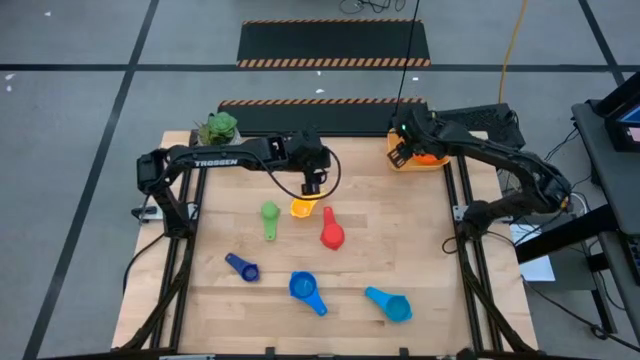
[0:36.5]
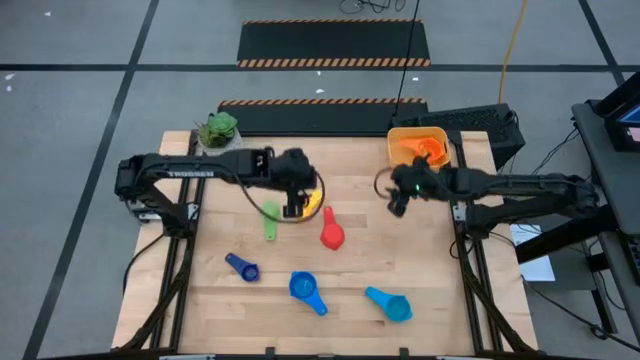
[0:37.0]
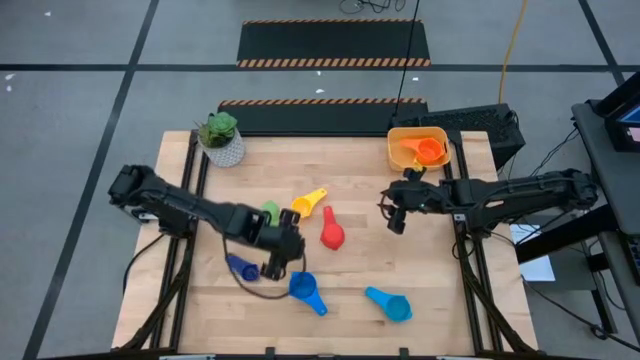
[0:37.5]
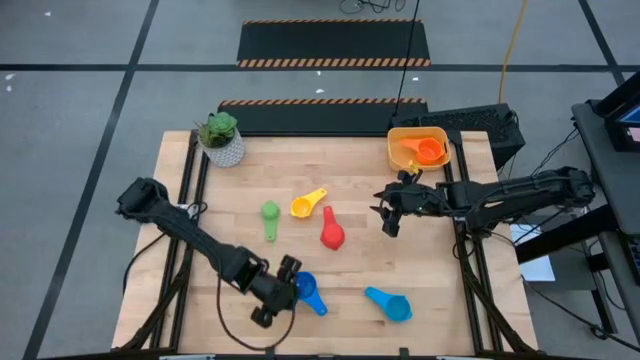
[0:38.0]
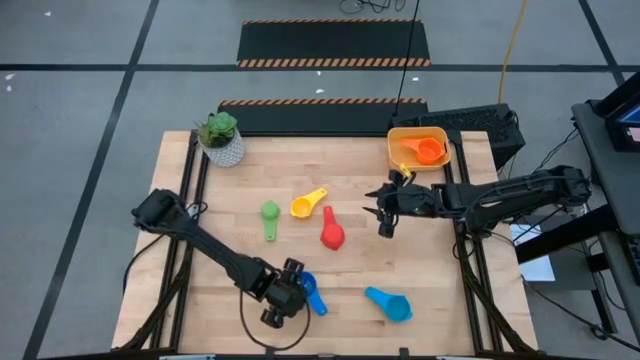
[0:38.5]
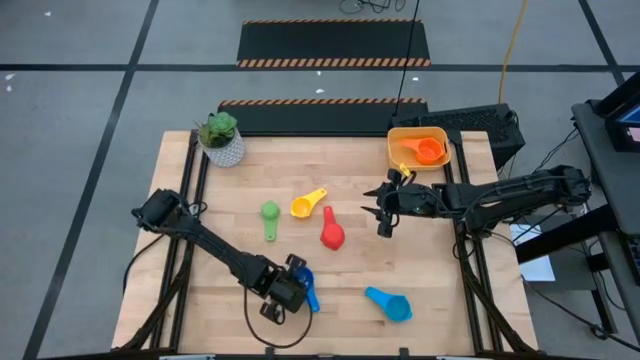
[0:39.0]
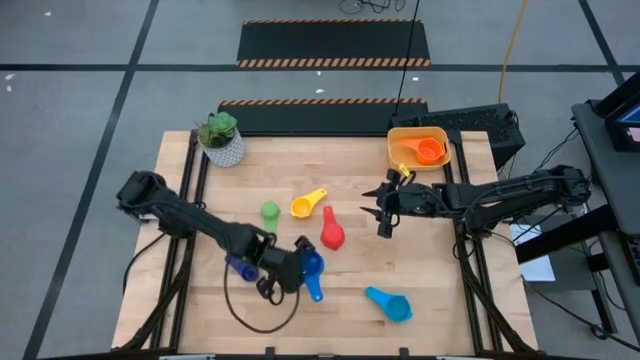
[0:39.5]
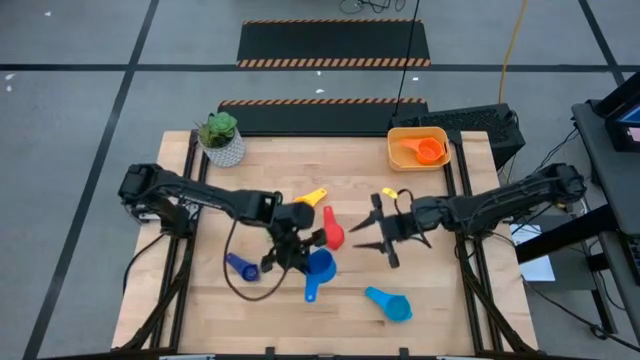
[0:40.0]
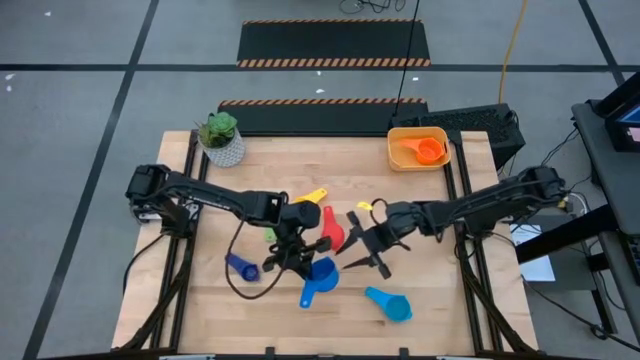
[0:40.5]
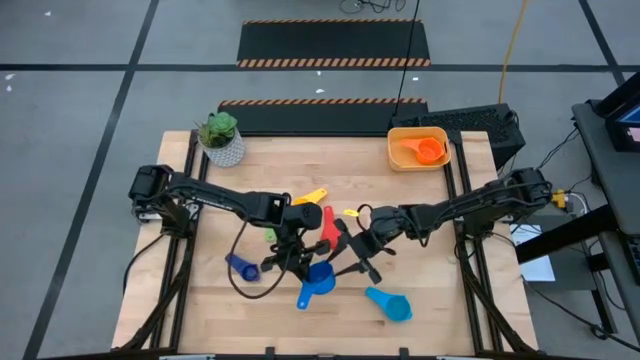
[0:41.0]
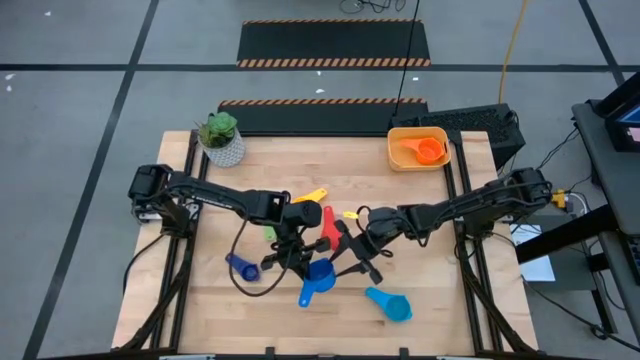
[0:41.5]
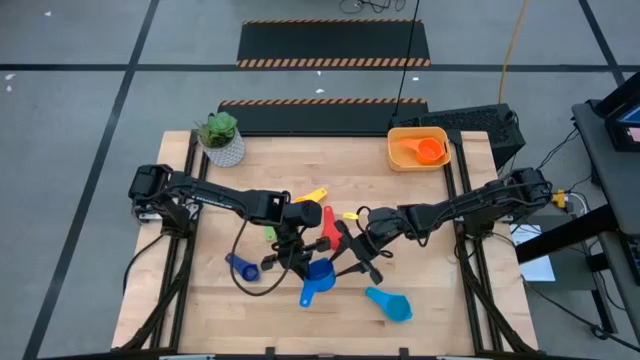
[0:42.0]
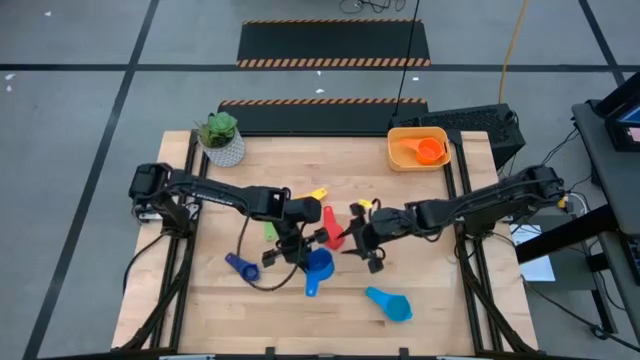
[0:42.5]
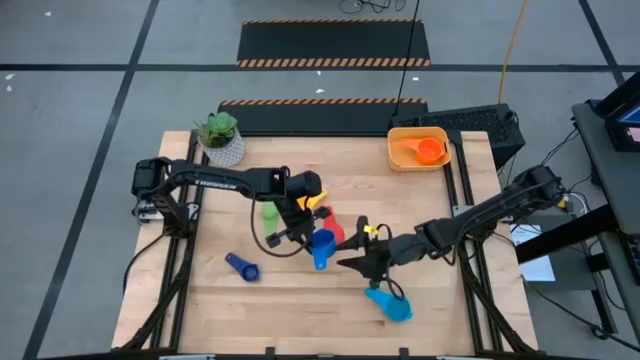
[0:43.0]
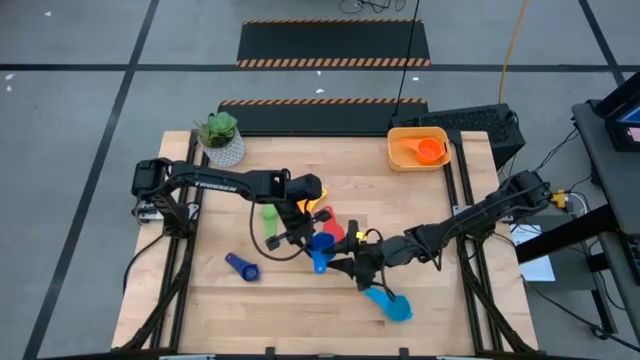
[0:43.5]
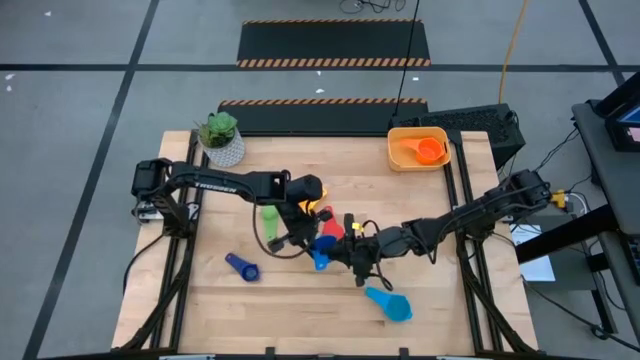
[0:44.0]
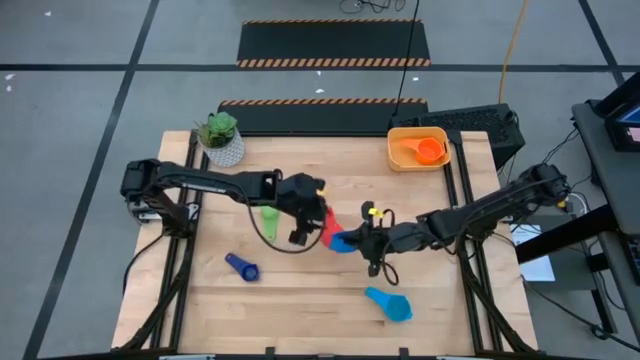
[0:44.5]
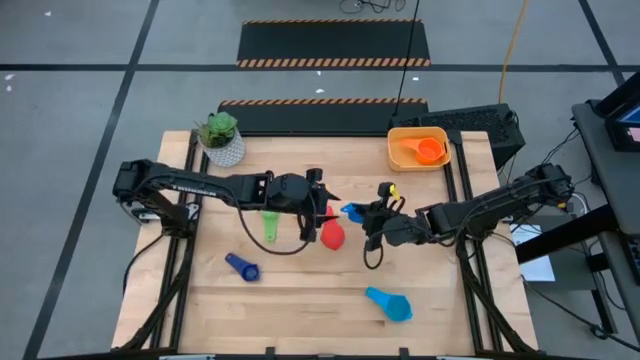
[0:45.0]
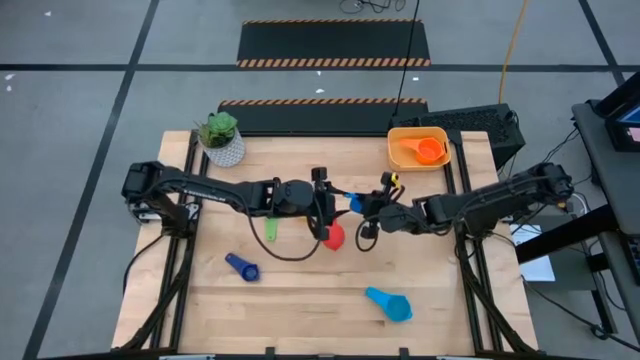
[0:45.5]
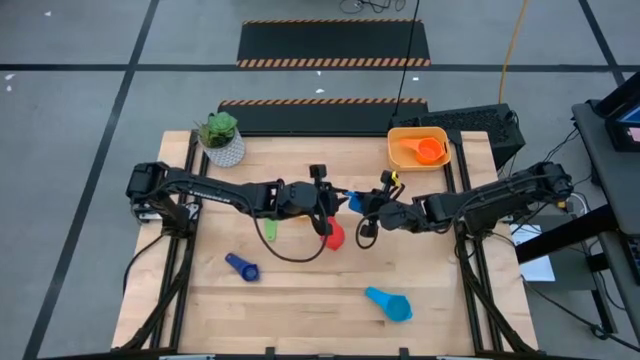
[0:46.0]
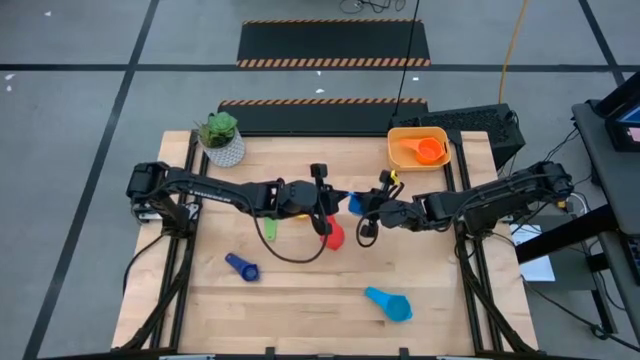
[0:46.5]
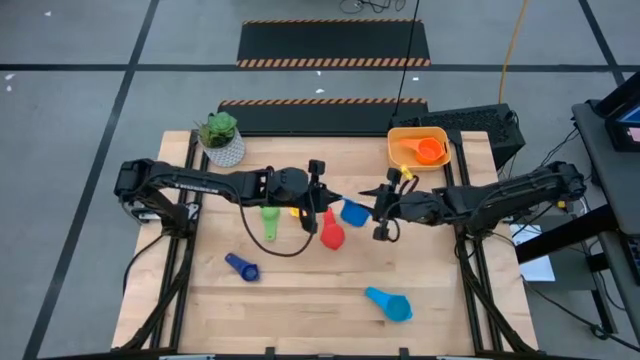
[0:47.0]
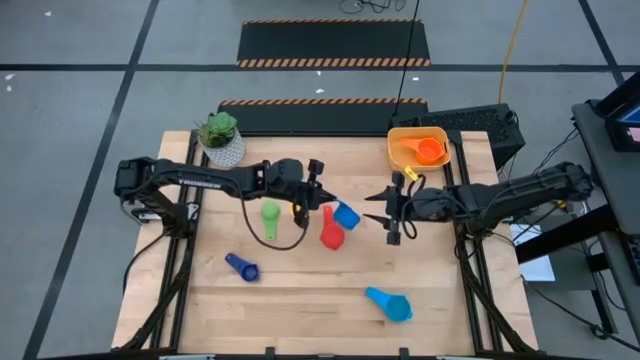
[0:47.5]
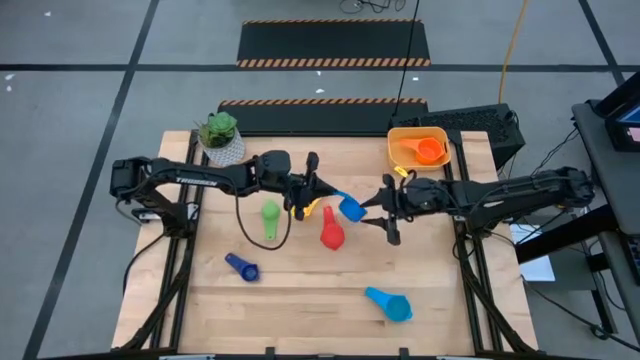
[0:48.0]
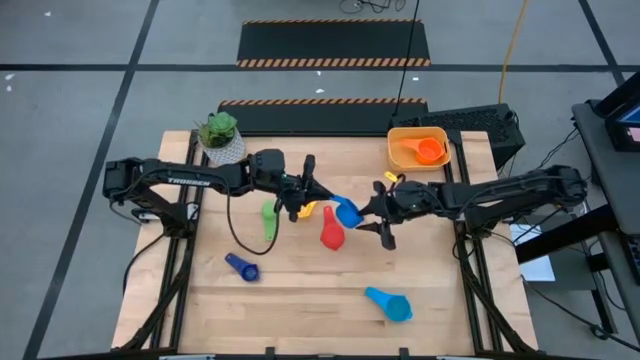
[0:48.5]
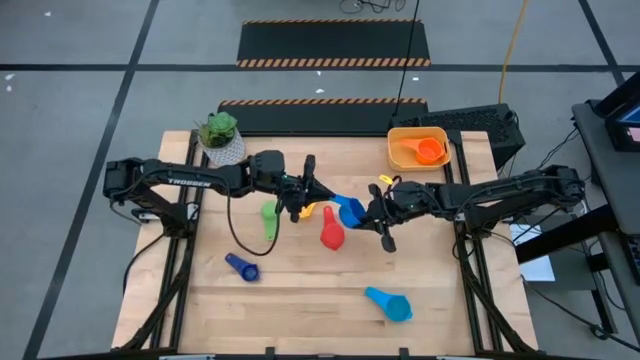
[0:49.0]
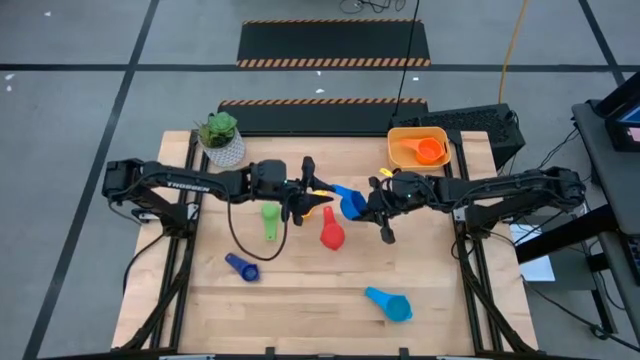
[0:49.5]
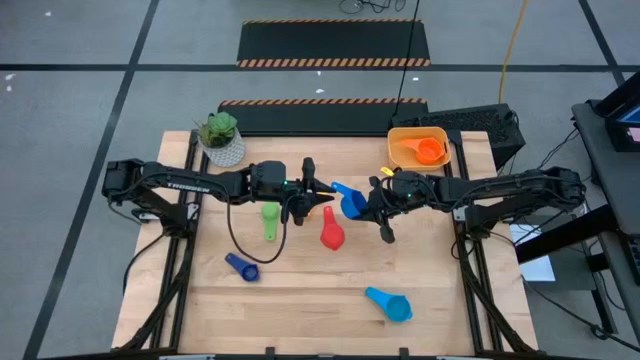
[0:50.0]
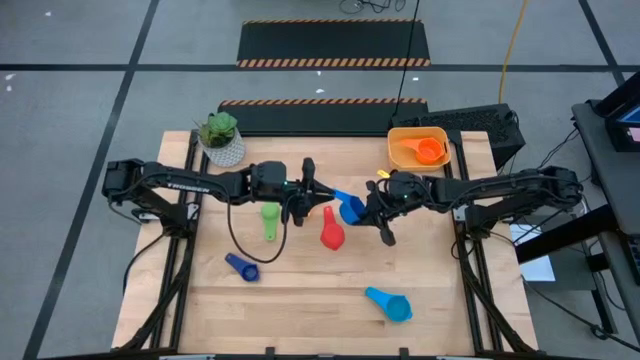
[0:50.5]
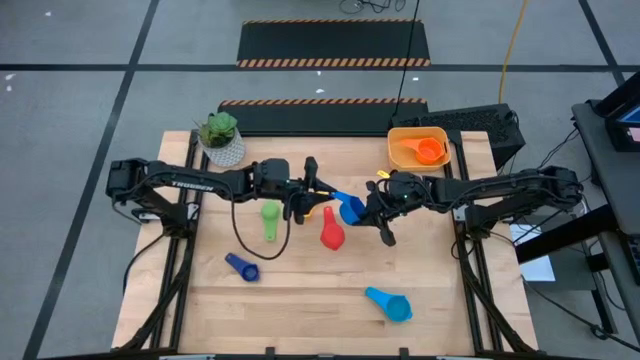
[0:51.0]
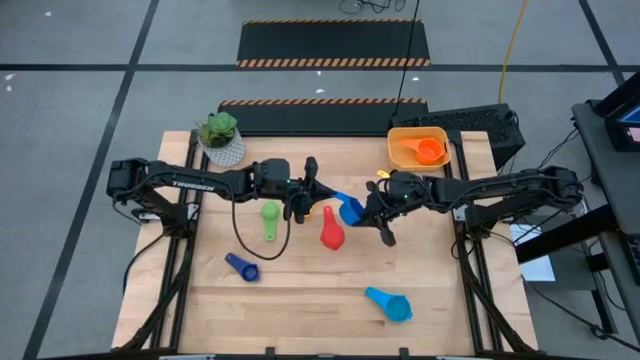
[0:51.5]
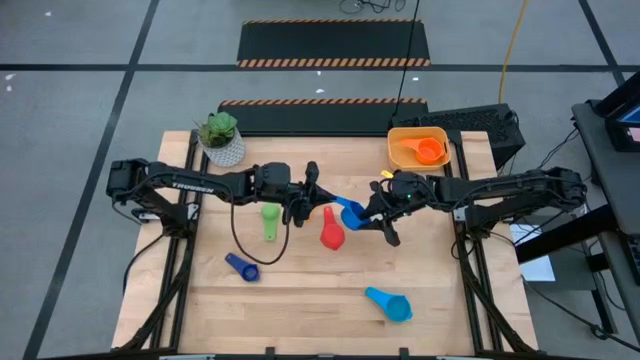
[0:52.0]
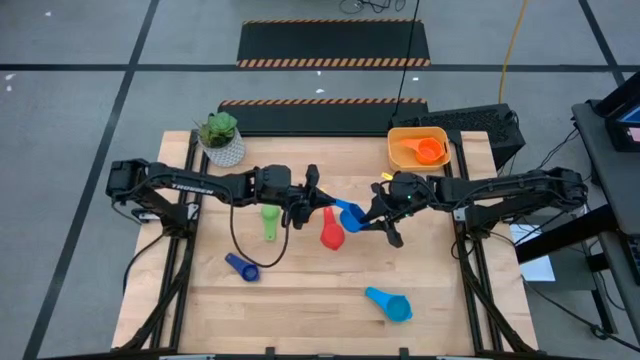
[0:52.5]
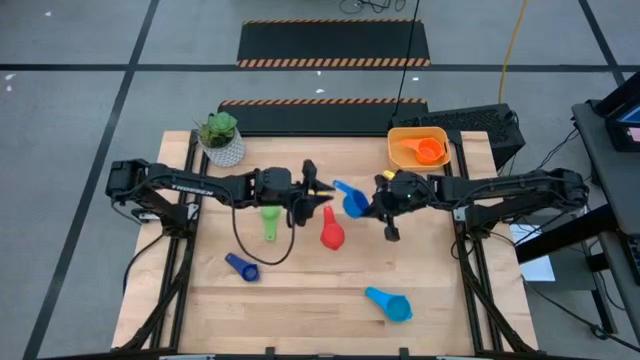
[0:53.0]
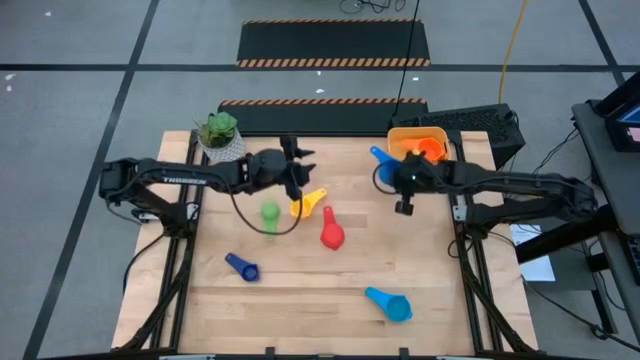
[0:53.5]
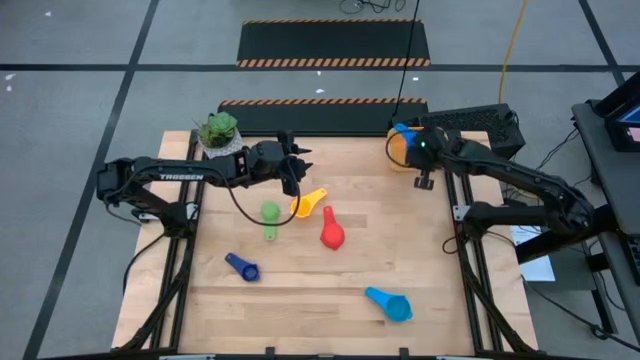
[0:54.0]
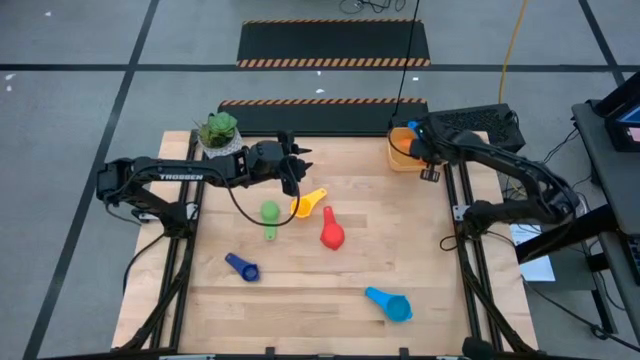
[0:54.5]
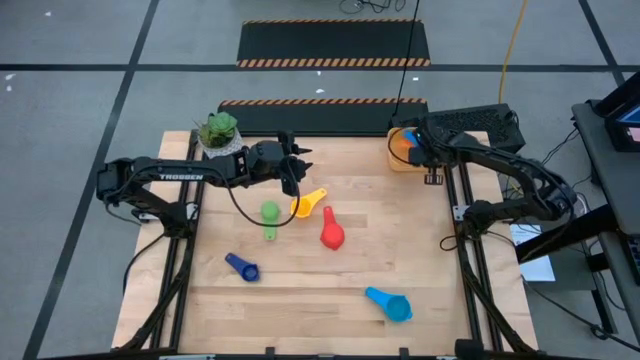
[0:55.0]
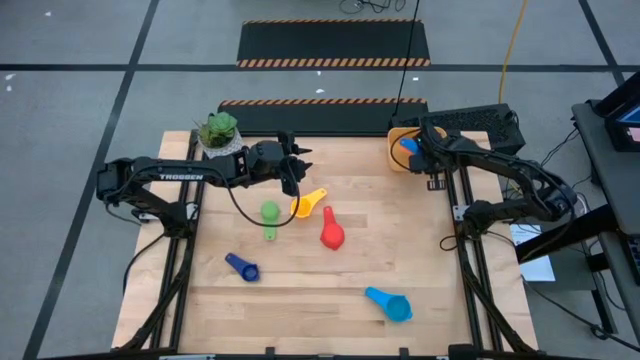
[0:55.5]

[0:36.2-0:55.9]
Task: Nest measuring cups in basket
Stack the left light blue measuring cup on top of the orange measuring cup into the bin

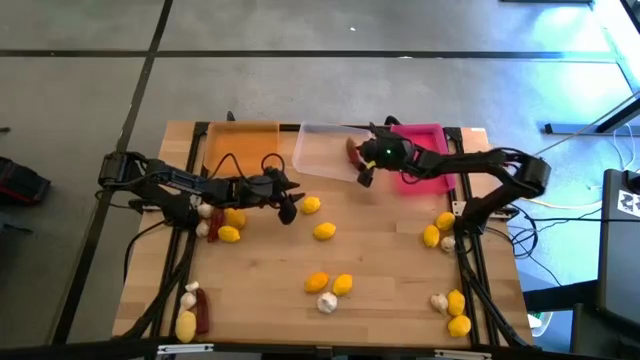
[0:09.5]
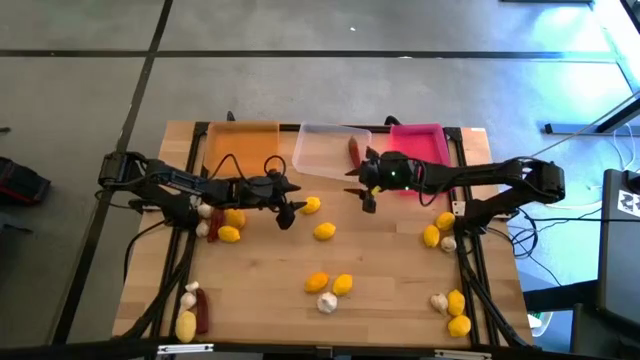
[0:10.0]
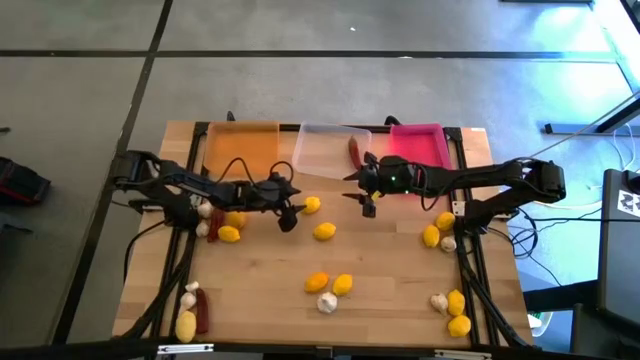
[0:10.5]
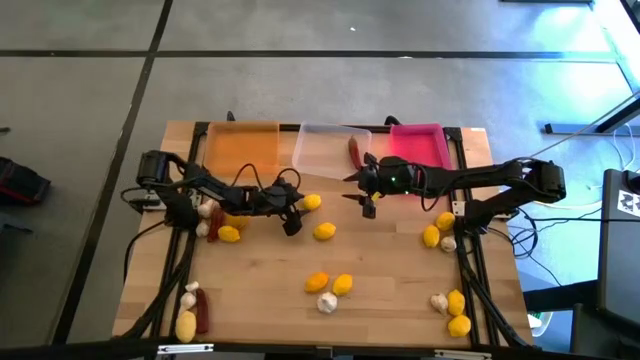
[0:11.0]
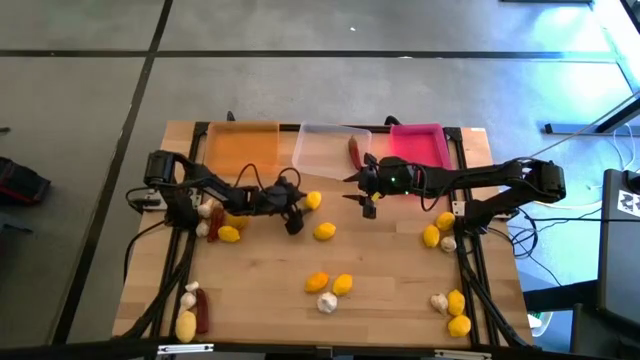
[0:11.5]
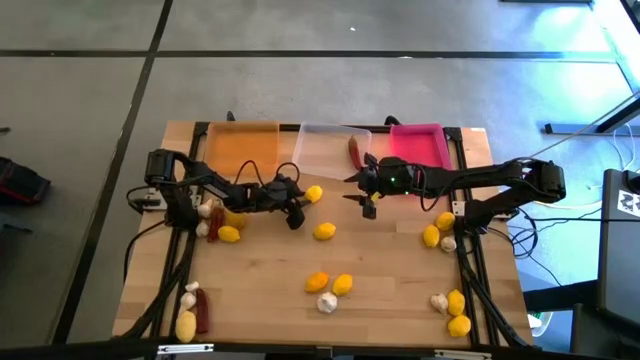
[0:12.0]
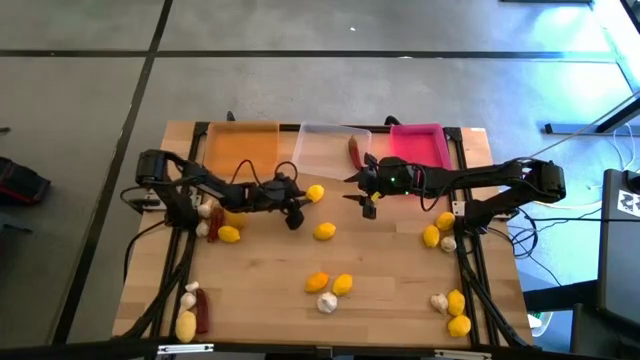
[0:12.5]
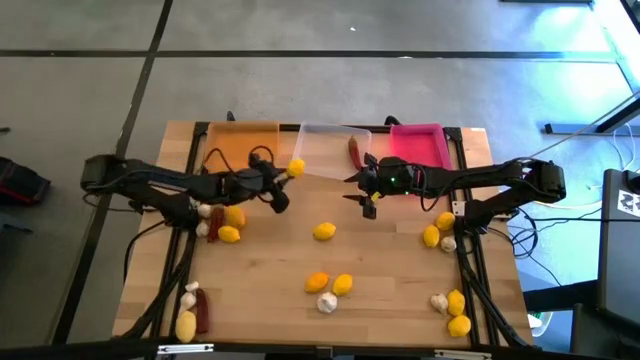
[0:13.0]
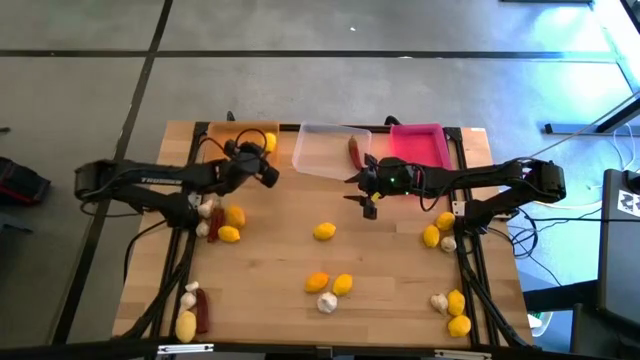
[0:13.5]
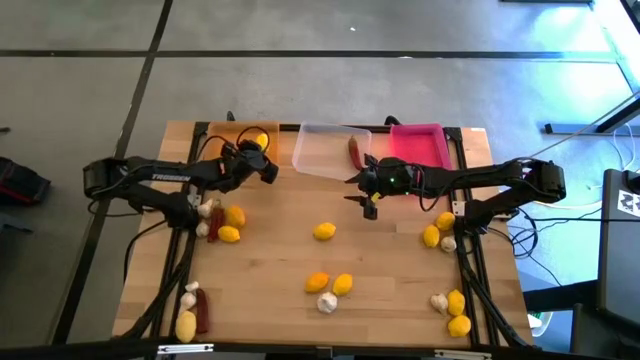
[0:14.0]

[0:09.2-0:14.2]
Task: Sort produce into baskets
Put the yellow lemon into the orange bin
